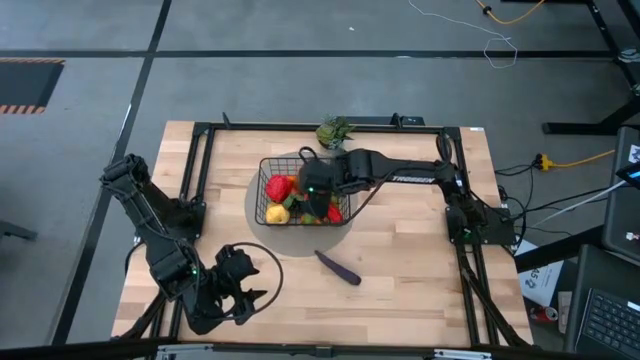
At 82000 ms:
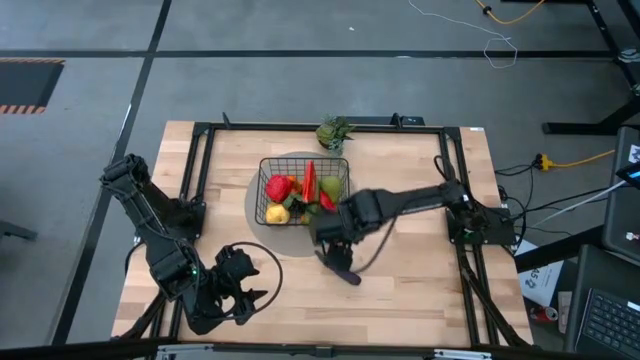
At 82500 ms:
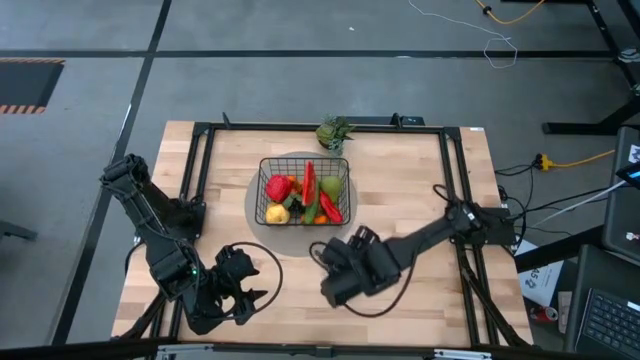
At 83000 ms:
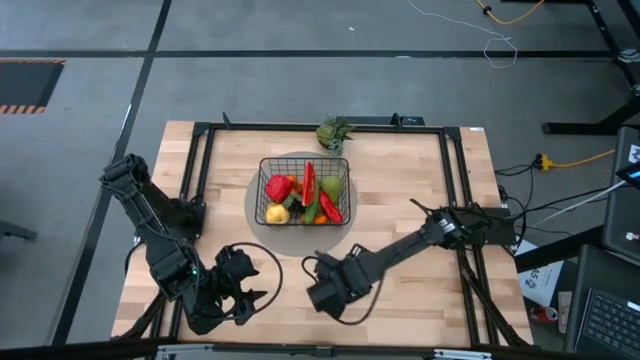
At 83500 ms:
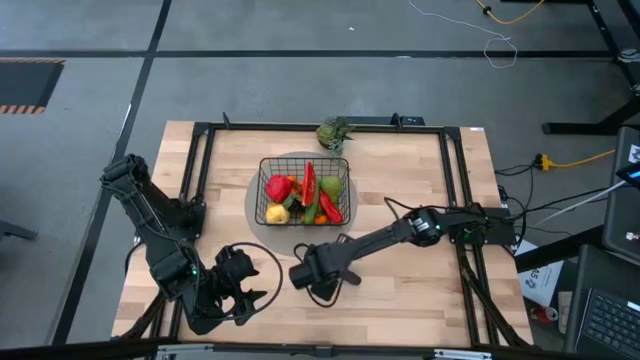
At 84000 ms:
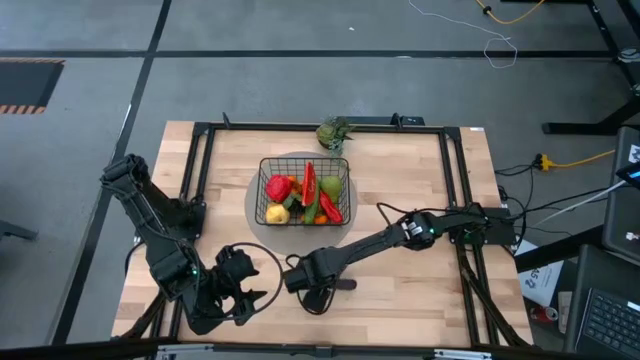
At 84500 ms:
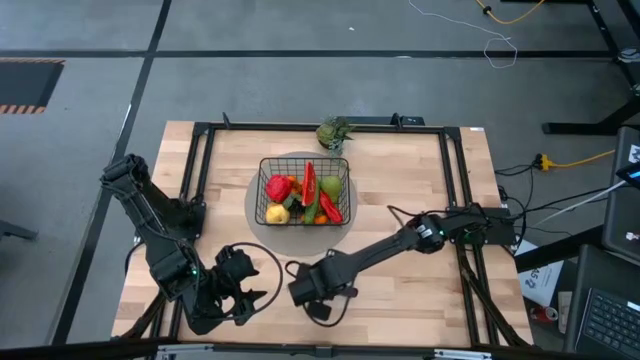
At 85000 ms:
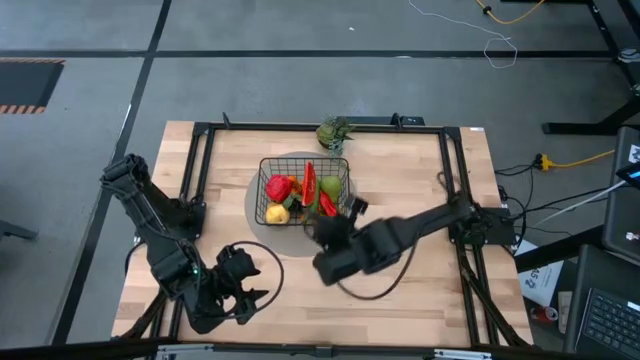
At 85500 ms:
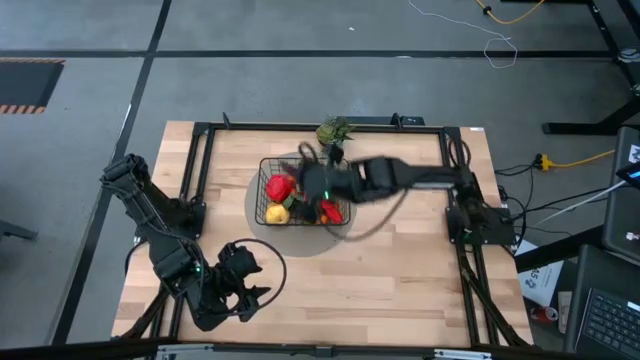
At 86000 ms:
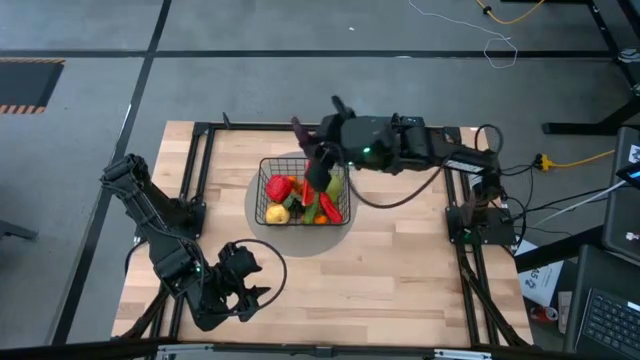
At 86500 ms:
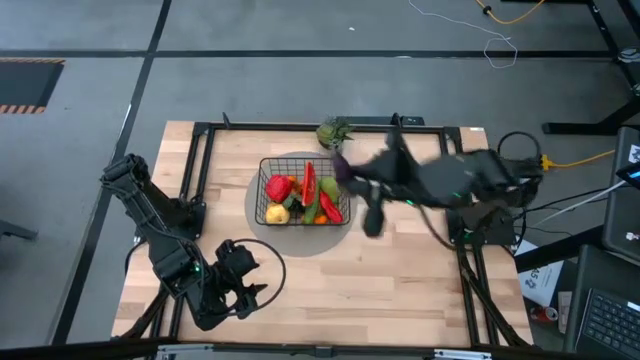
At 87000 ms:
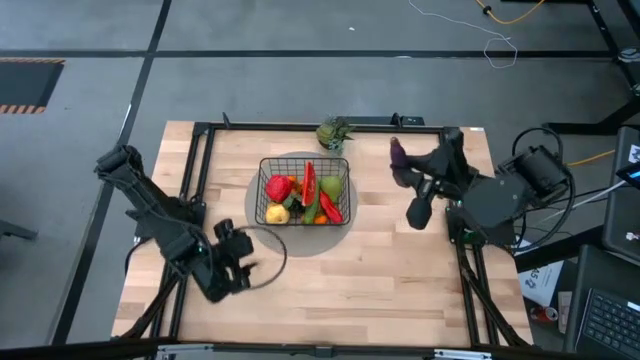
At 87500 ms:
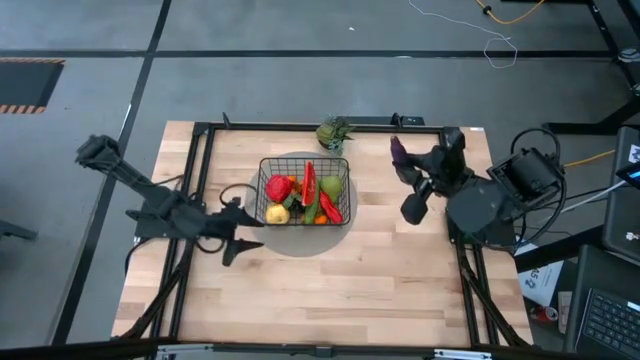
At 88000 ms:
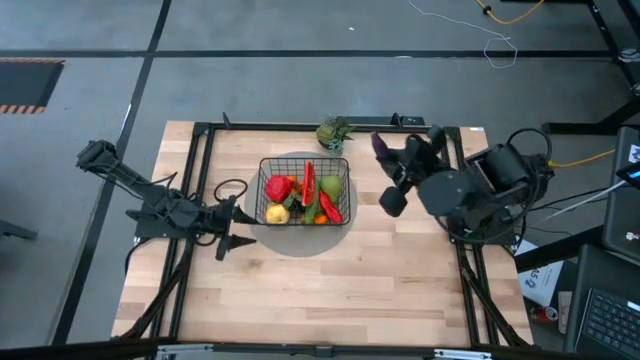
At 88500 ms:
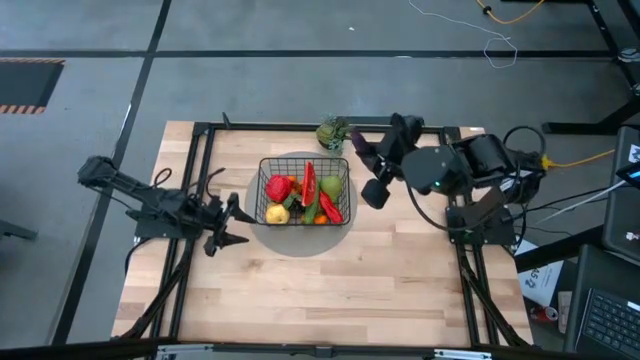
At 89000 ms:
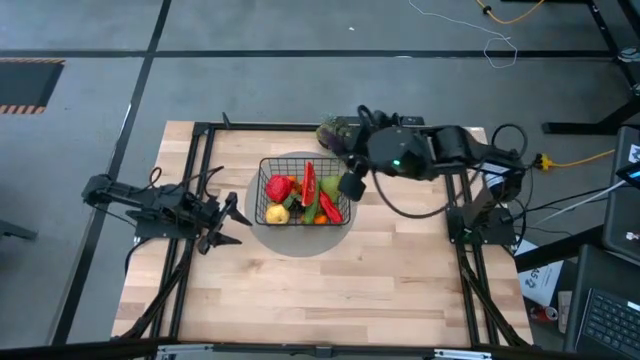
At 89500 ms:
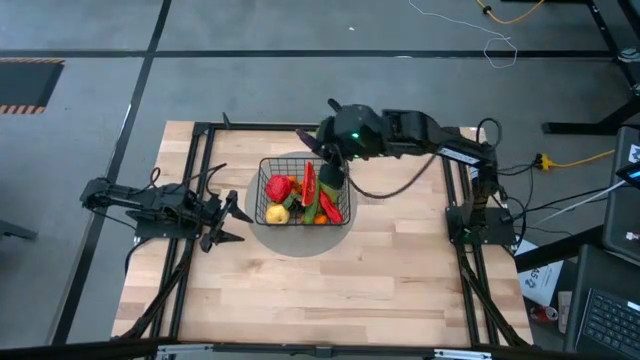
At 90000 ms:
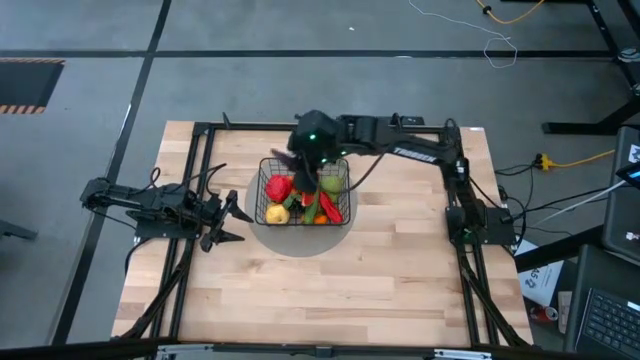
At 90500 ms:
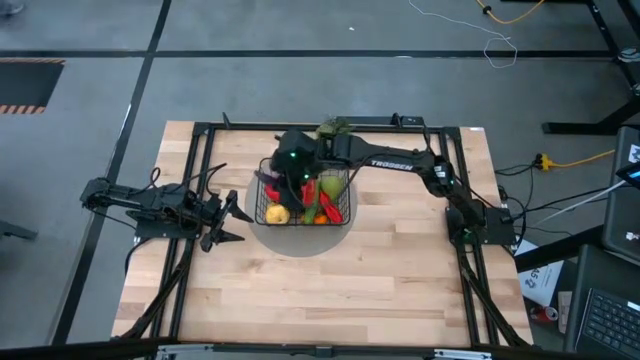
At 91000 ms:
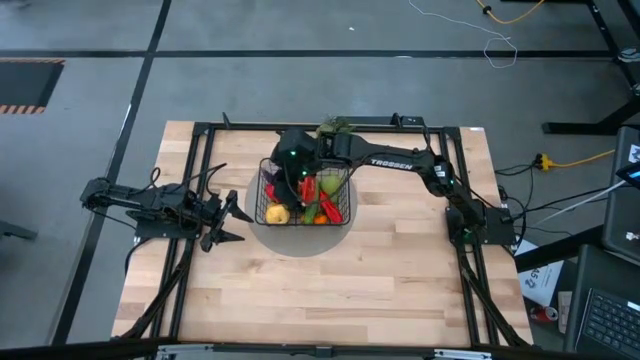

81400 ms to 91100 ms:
Task: Build produce basket
Put the purple eggplant into the black wire basket

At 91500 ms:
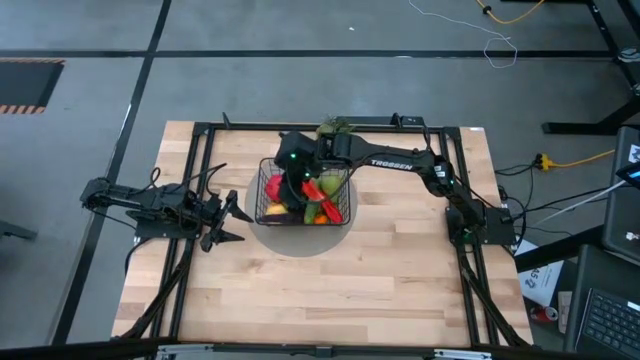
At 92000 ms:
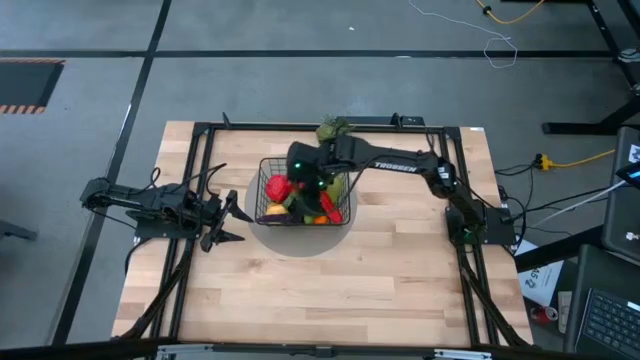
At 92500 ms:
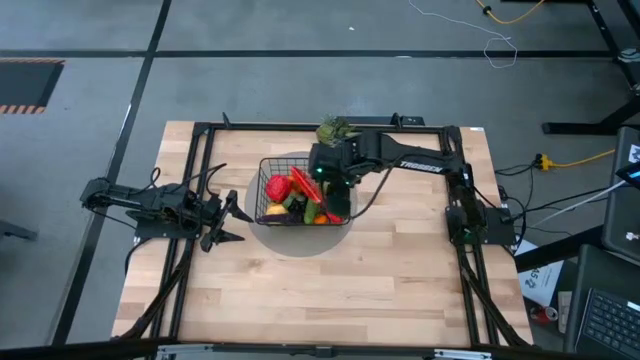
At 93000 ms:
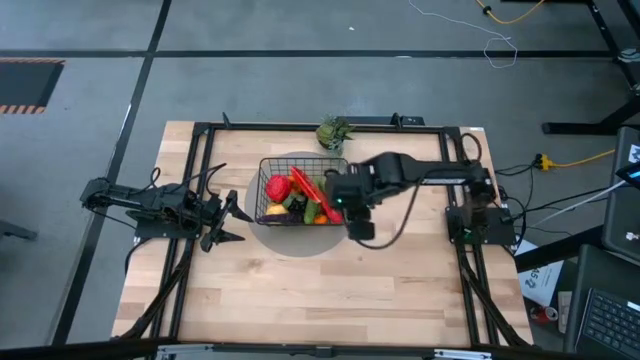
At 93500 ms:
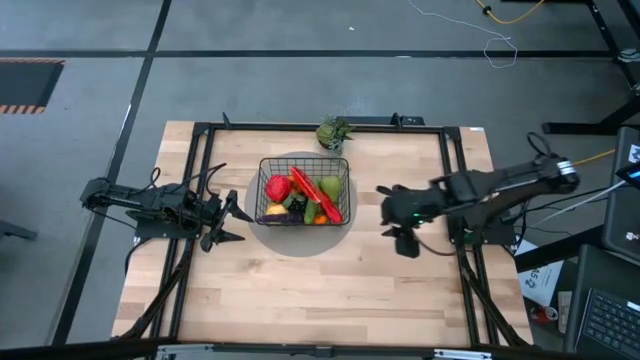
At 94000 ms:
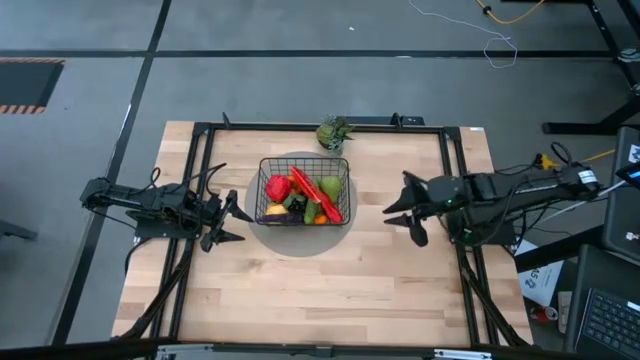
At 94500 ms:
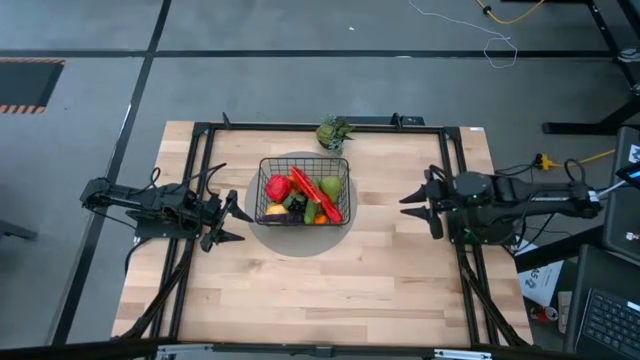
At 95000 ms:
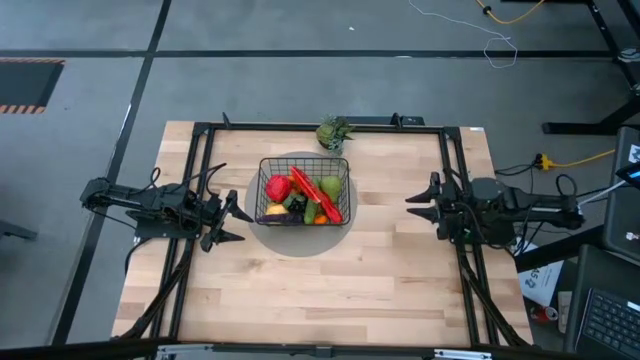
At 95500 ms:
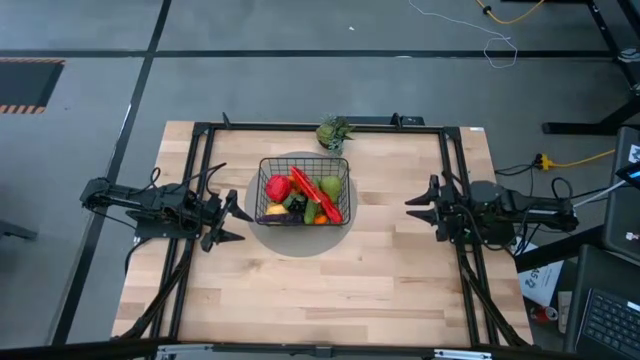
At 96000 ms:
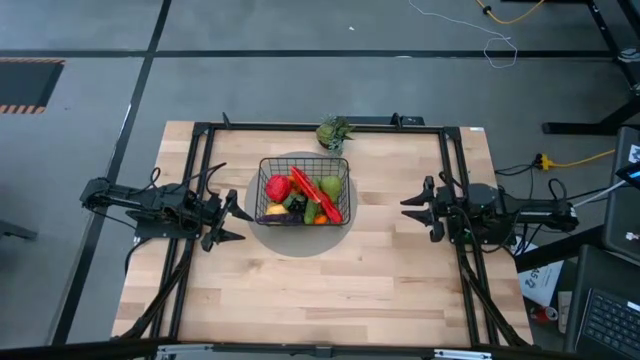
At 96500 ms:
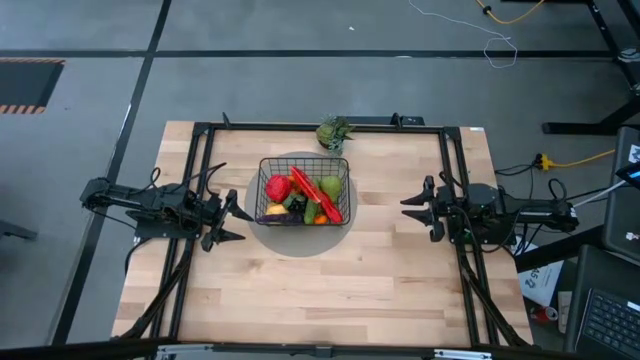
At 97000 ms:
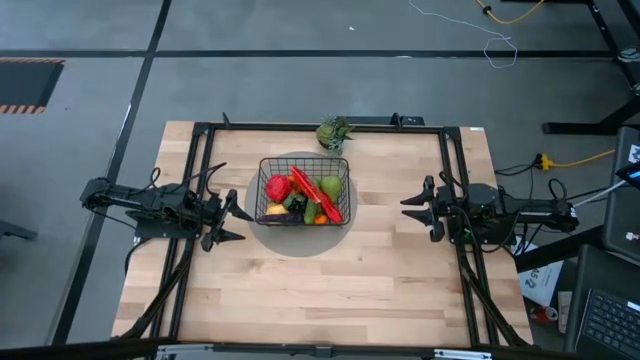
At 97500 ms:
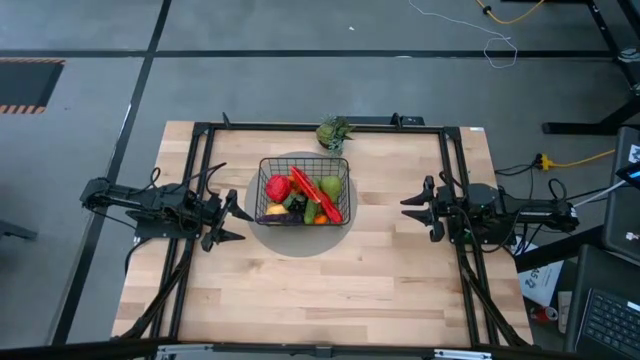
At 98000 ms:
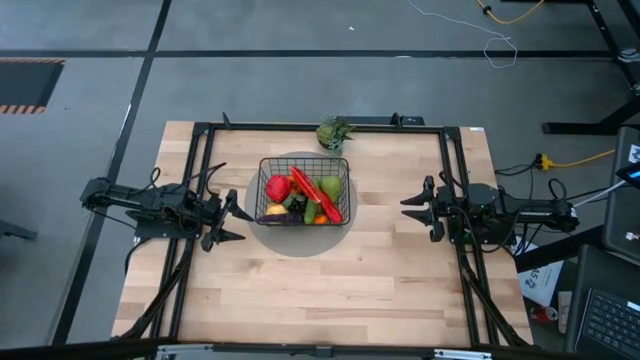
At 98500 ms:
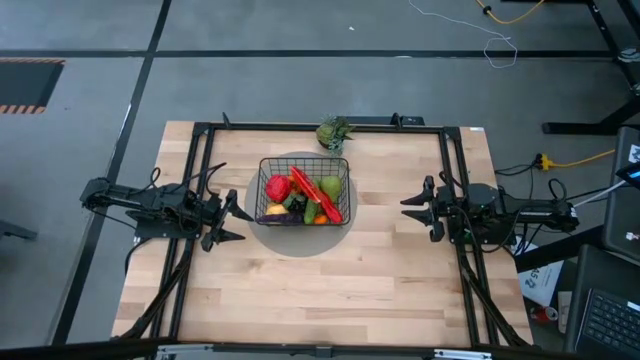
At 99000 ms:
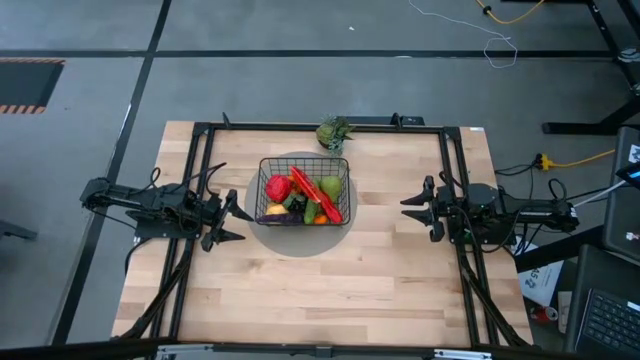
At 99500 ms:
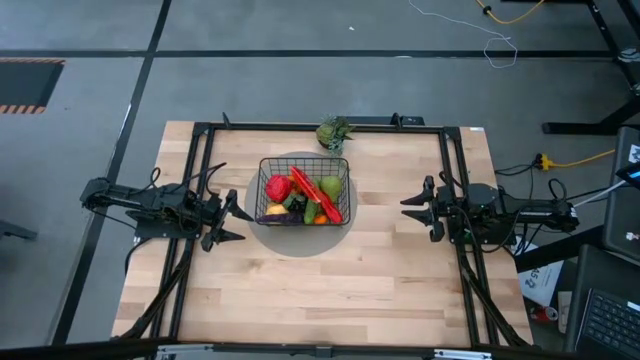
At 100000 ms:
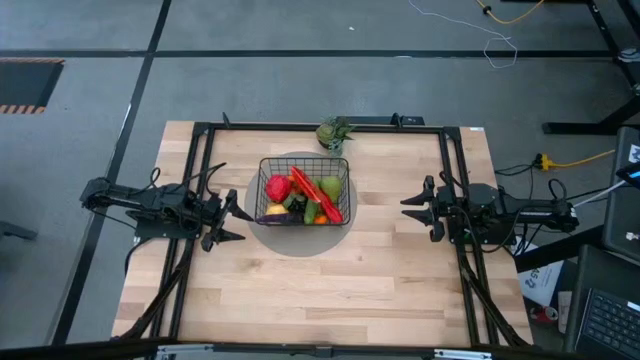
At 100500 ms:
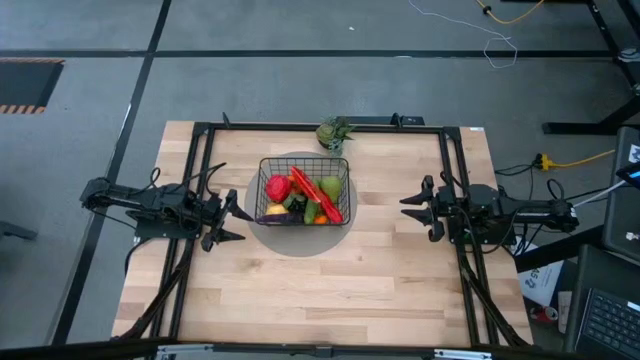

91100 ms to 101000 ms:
Return to Home Position

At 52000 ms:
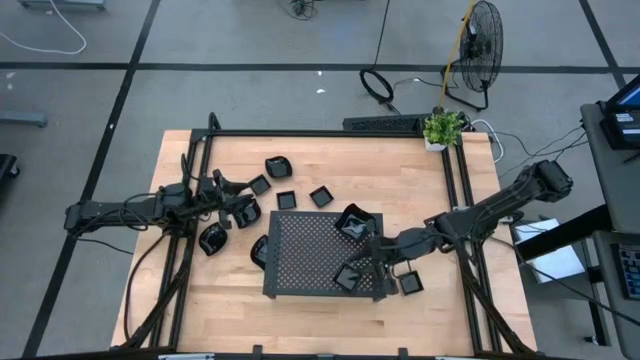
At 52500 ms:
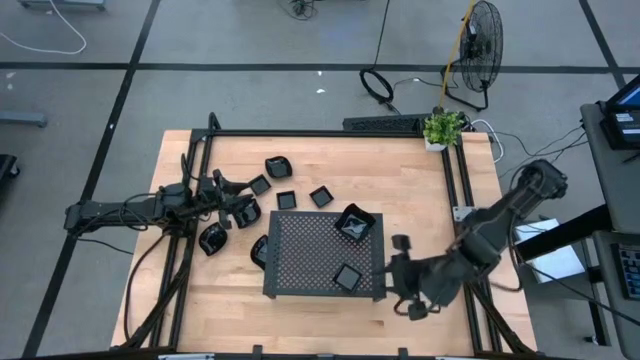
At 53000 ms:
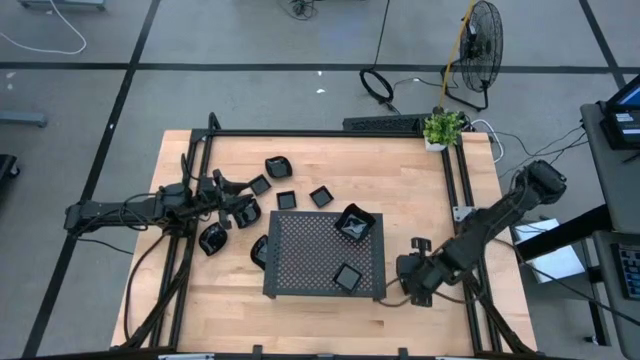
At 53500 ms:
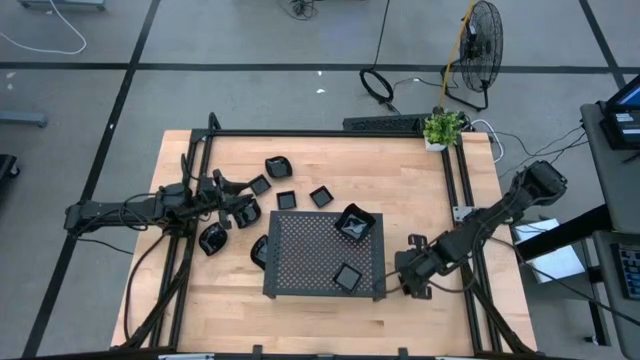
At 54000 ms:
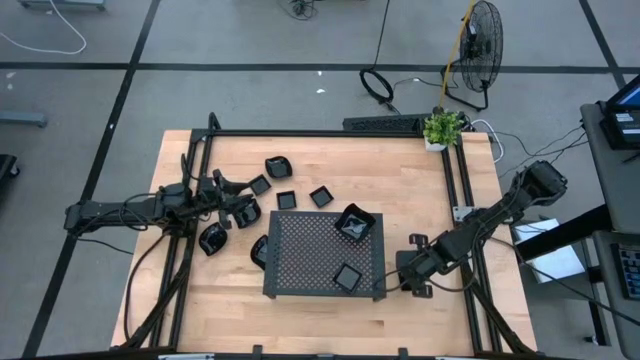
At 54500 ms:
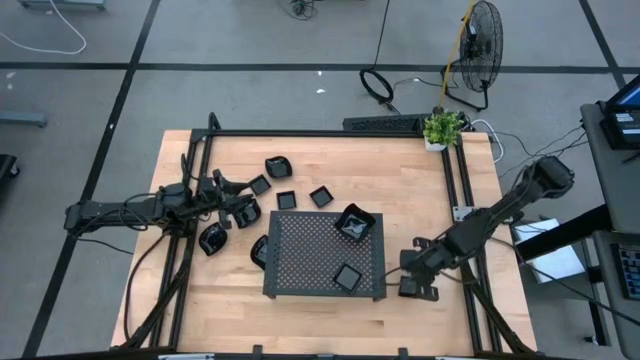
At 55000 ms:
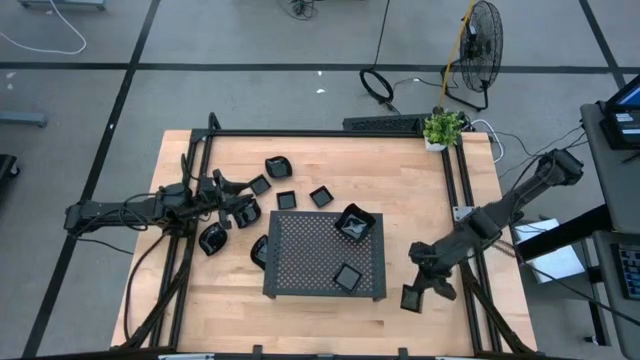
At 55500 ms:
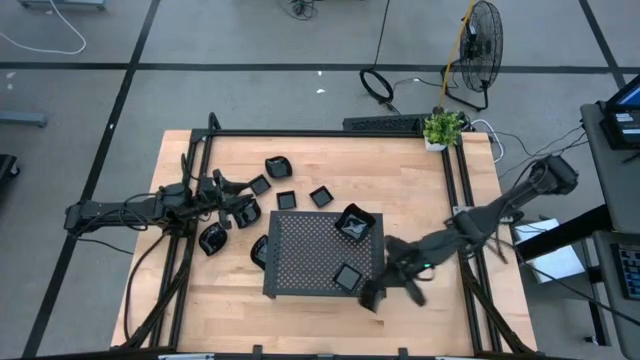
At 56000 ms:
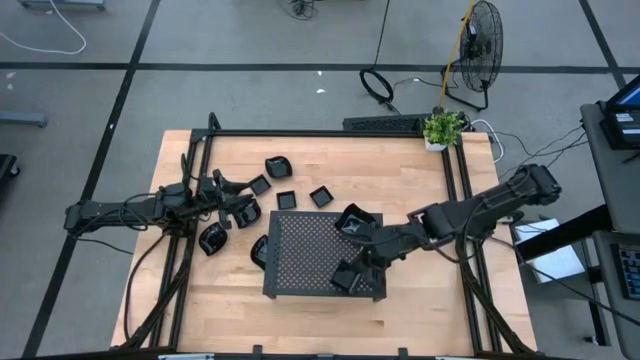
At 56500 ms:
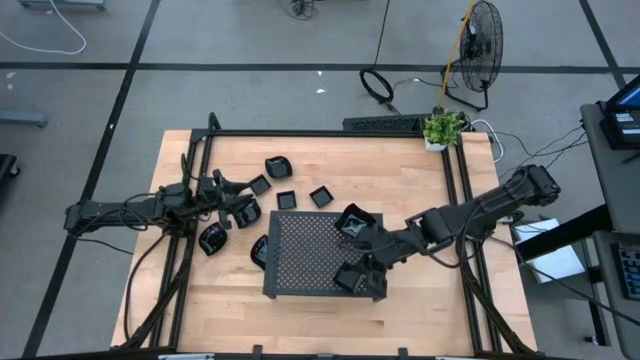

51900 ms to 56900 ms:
Task: Pick & Place Mini shaped plates
Stack the black square plate on top of the black square plate on the shelf
